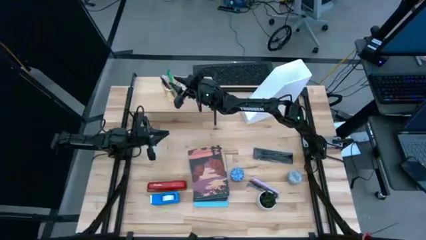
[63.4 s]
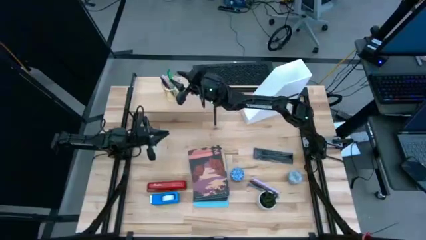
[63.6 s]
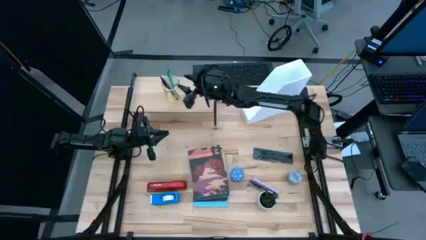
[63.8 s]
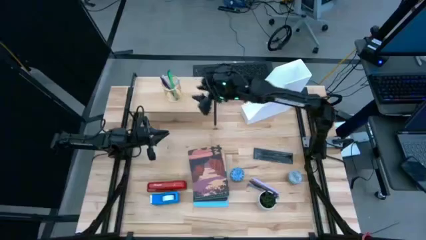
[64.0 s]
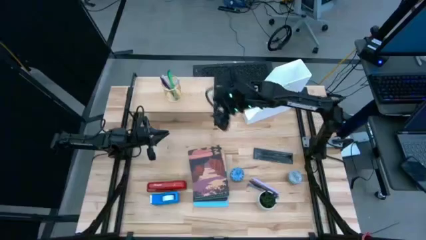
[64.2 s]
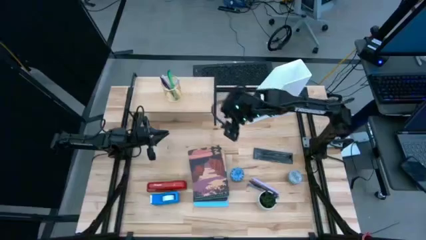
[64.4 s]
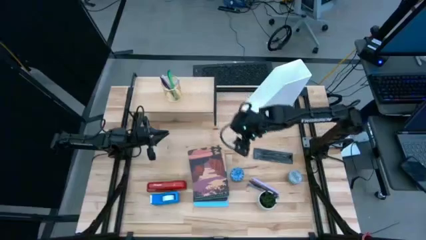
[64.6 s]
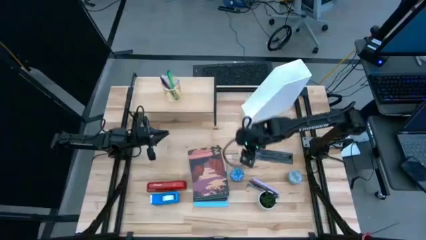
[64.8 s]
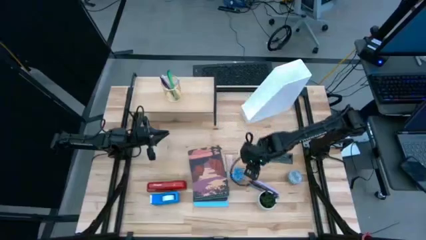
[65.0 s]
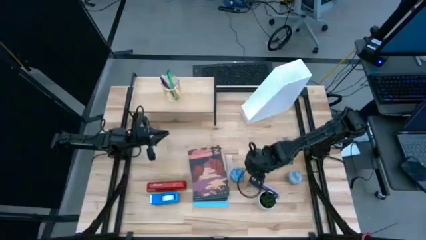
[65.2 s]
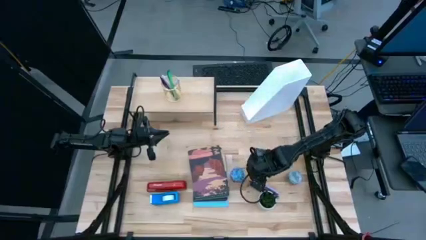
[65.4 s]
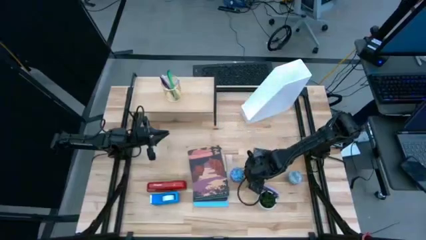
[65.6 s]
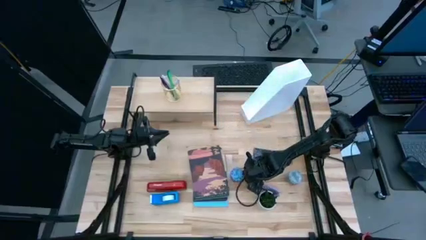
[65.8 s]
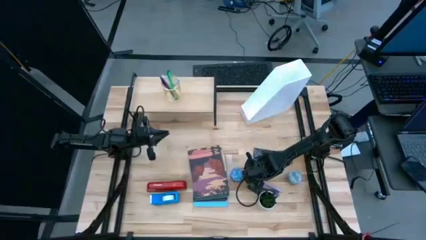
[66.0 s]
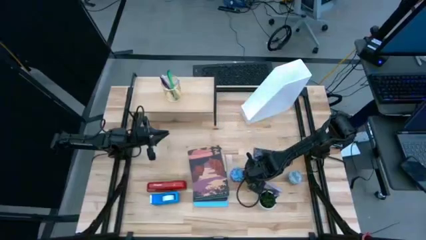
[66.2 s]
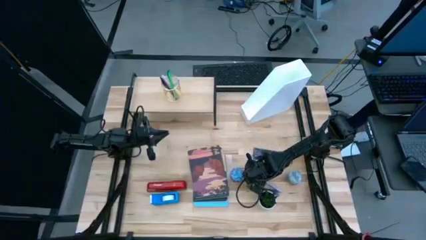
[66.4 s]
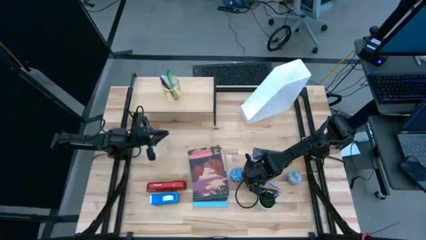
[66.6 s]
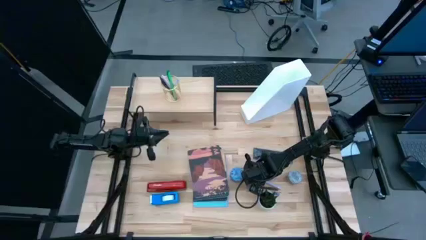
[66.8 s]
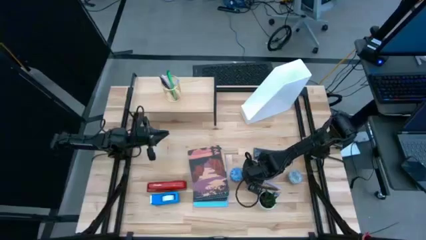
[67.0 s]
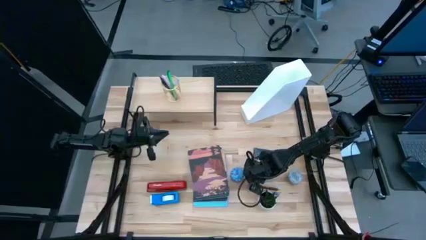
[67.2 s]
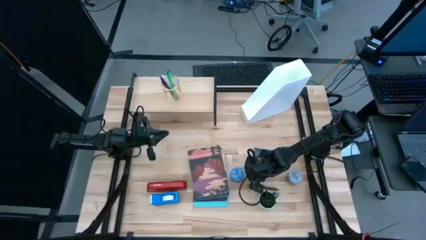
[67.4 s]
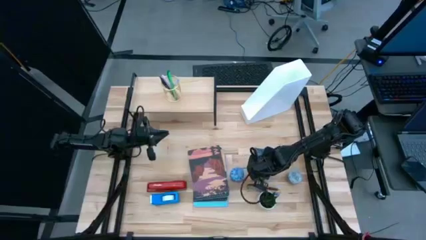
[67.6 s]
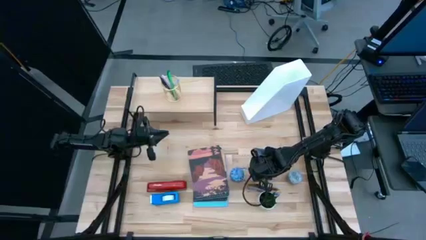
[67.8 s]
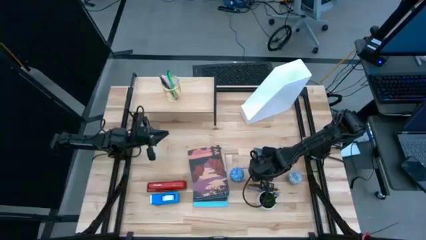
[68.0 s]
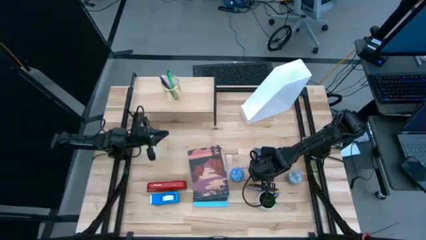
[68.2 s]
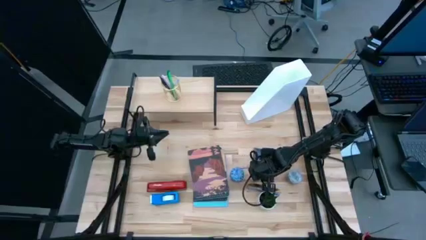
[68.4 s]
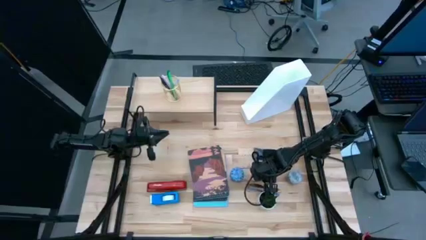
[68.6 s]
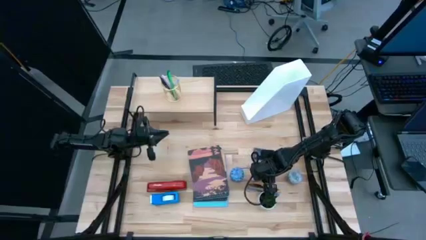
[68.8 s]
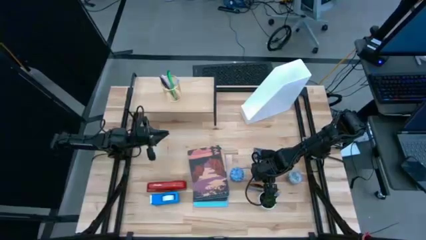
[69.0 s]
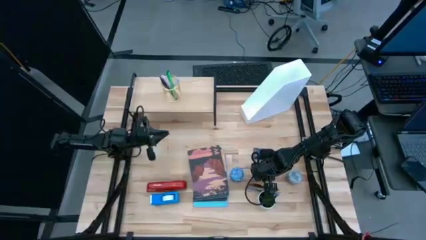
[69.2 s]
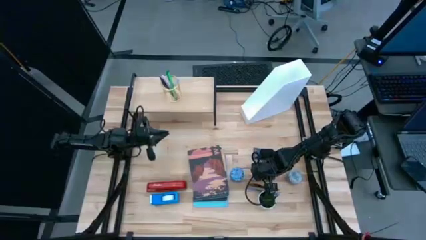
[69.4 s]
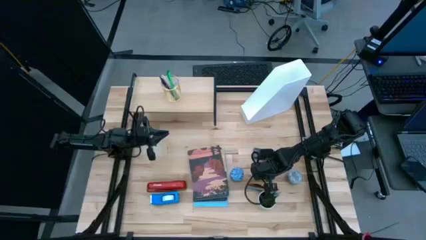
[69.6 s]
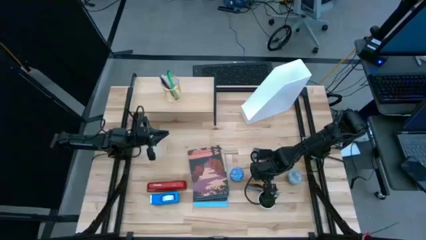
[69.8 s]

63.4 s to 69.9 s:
Task: Stock shelves
Put the purple pen into the gold pen holder on the shelf

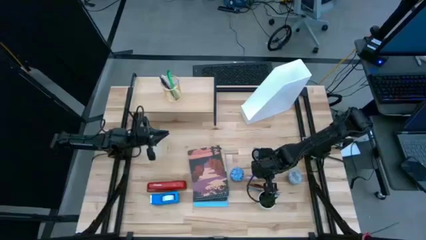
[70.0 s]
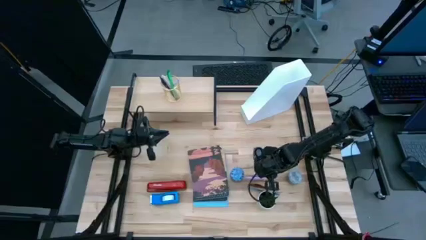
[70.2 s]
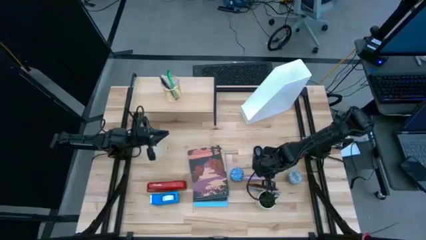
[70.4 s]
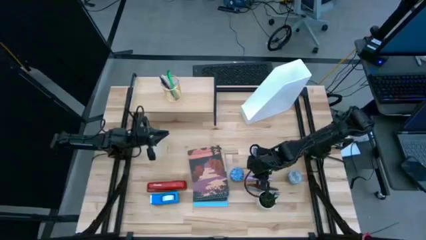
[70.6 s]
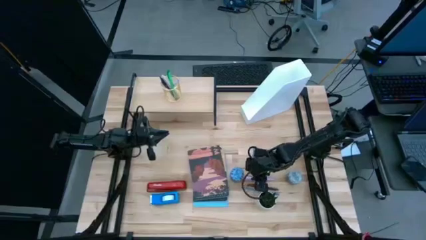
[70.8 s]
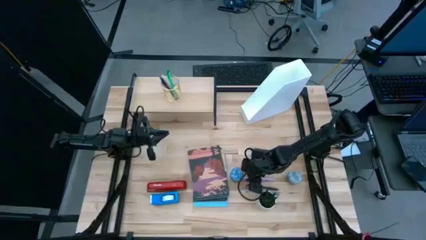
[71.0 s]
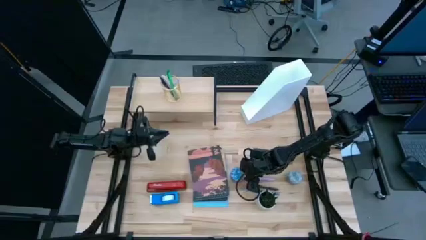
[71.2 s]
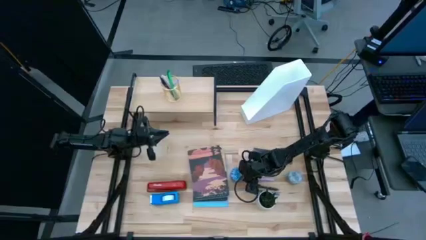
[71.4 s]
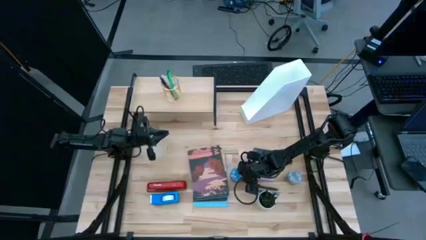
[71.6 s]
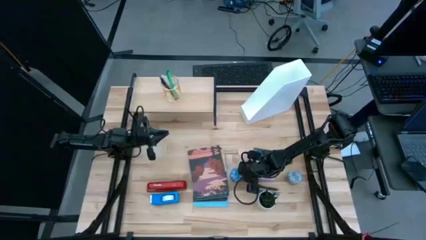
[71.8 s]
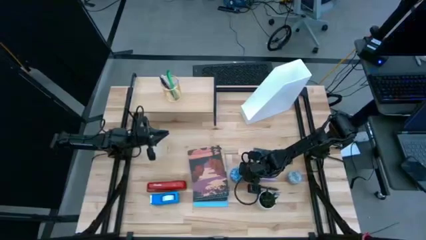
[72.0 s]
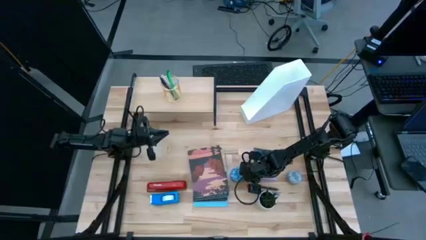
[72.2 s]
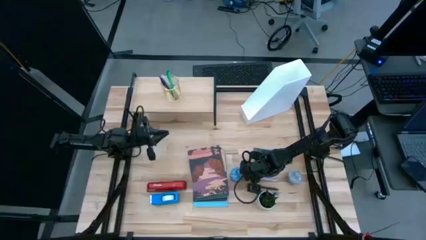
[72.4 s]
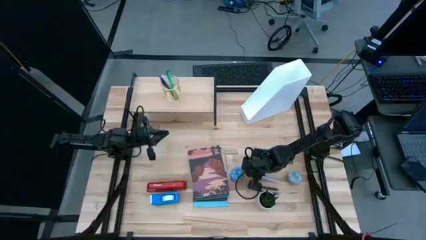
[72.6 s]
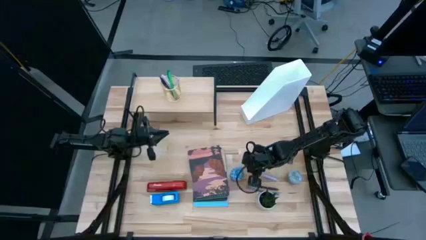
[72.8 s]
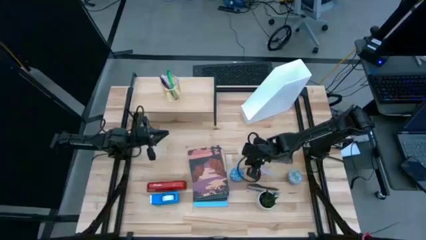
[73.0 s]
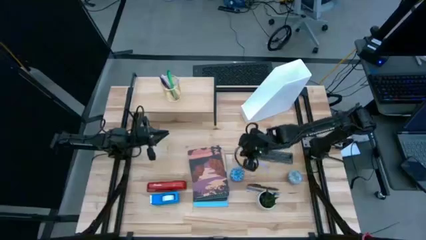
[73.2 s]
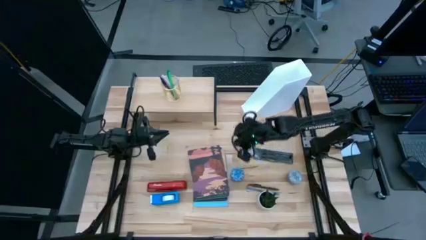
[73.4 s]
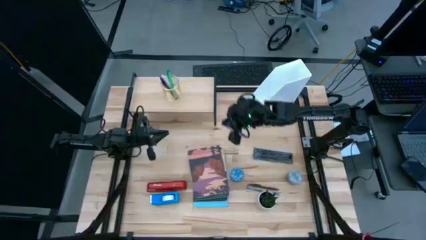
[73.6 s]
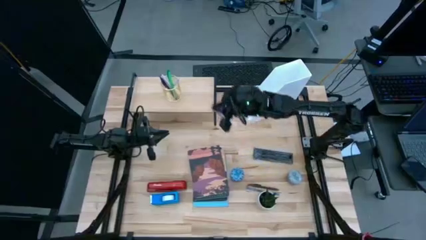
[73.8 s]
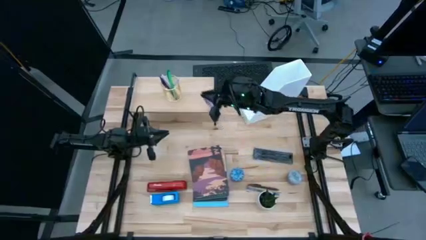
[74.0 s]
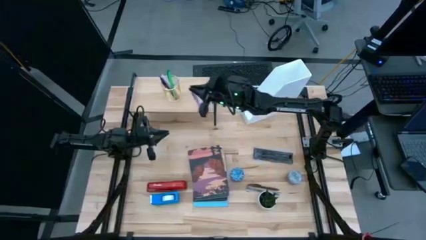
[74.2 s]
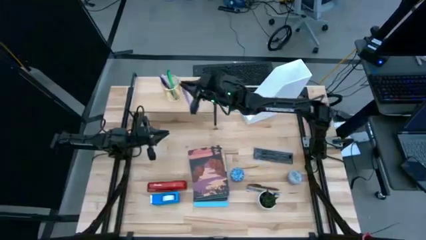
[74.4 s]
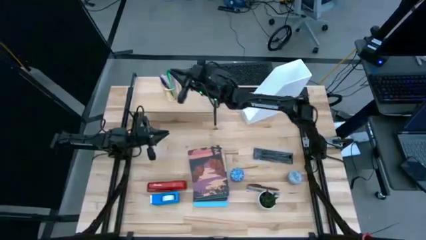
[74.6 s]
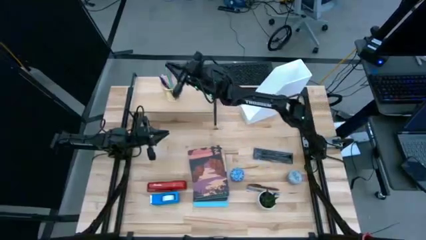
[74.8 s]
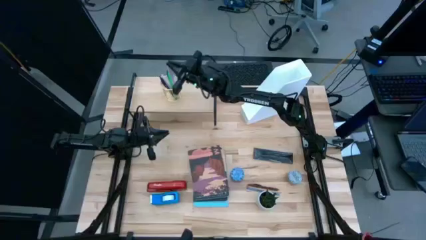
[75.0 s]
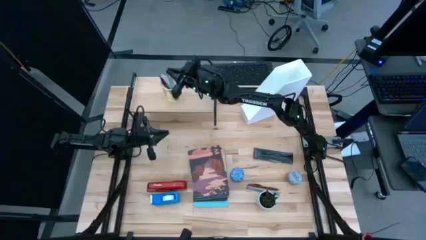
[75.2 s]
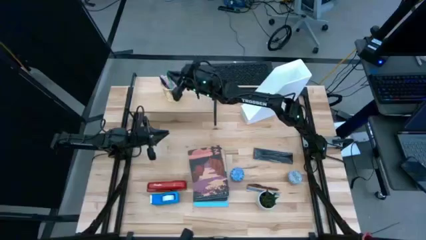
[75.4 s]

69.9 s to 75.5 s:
Put the purple pen into the gold pen holder on the shelf

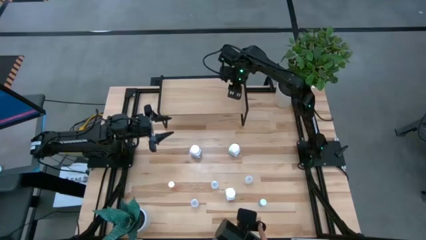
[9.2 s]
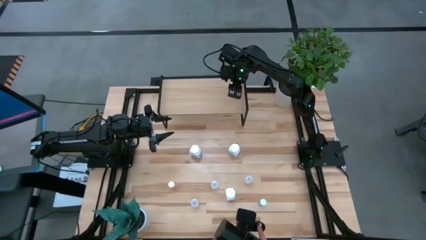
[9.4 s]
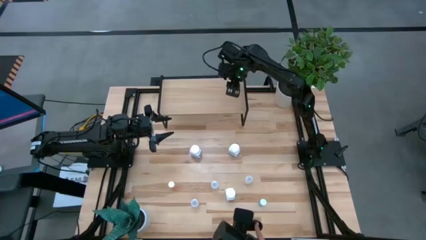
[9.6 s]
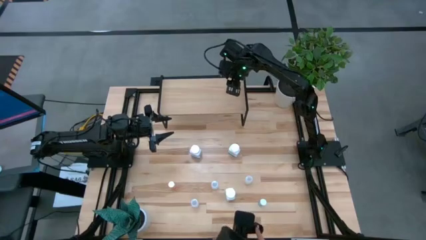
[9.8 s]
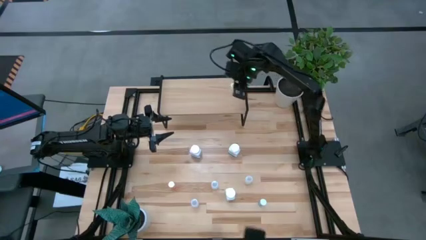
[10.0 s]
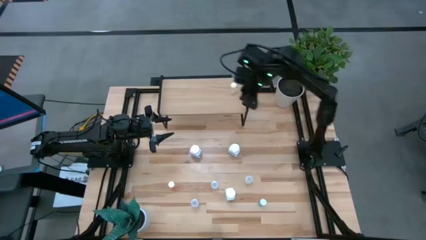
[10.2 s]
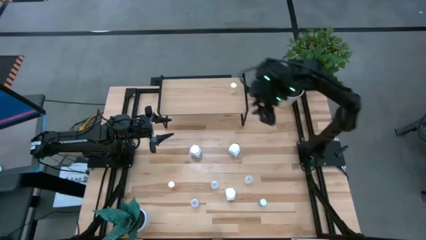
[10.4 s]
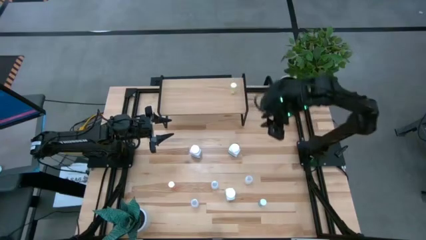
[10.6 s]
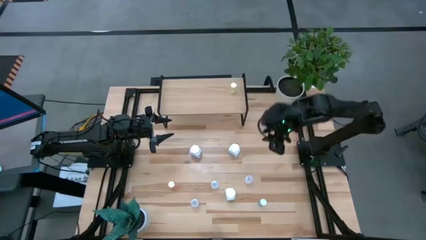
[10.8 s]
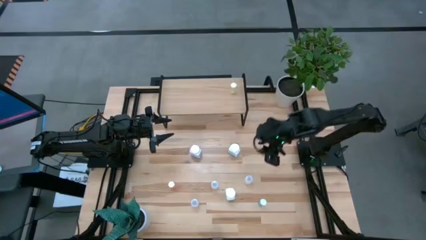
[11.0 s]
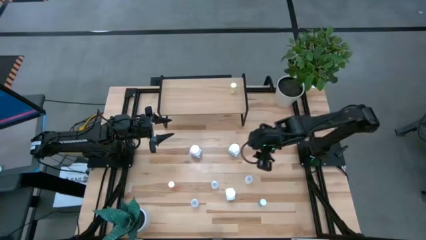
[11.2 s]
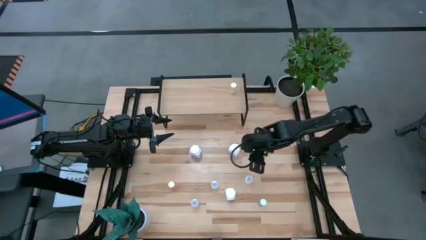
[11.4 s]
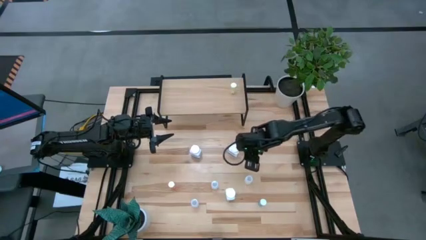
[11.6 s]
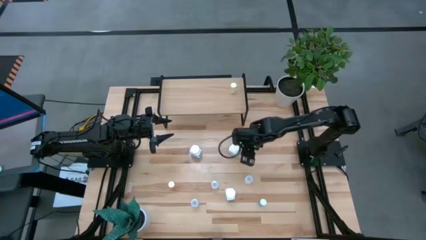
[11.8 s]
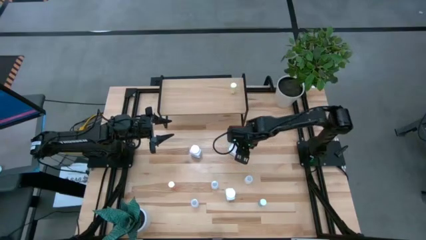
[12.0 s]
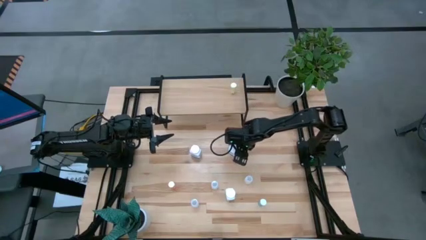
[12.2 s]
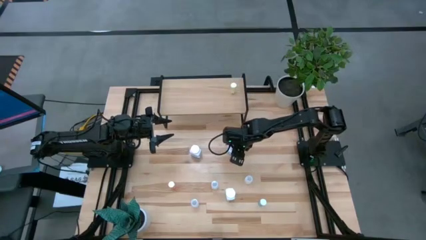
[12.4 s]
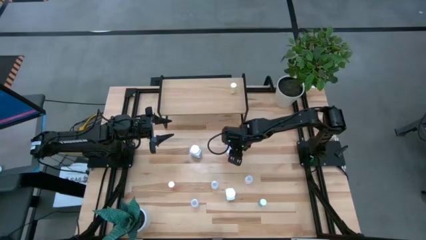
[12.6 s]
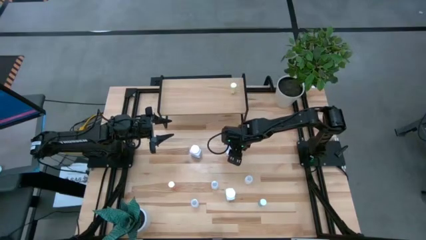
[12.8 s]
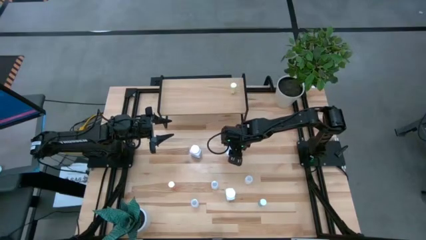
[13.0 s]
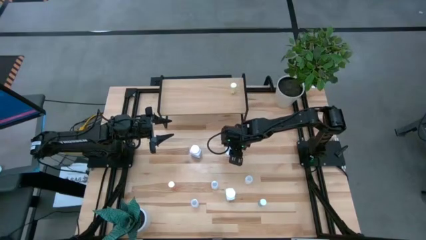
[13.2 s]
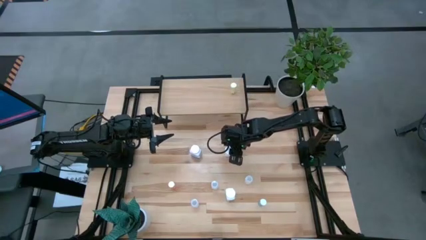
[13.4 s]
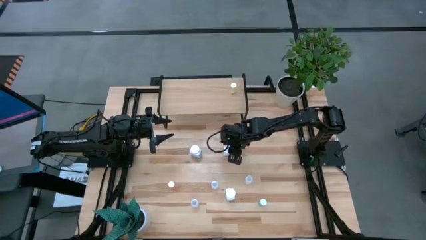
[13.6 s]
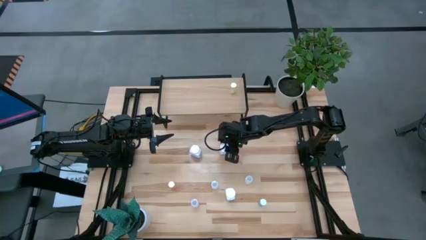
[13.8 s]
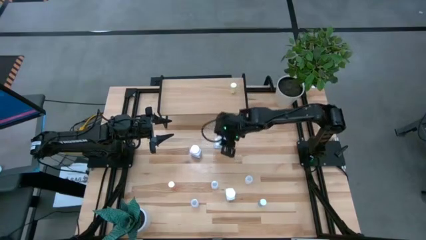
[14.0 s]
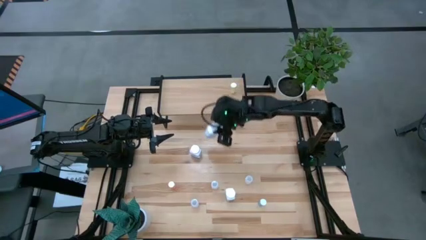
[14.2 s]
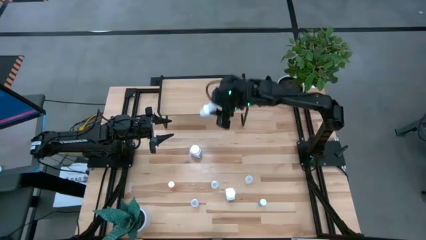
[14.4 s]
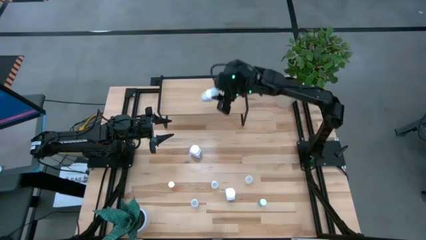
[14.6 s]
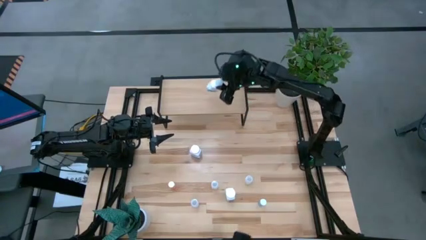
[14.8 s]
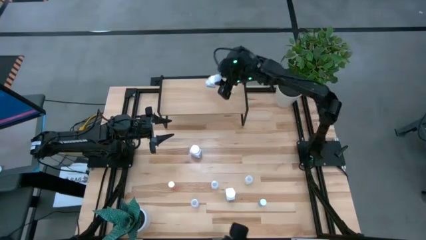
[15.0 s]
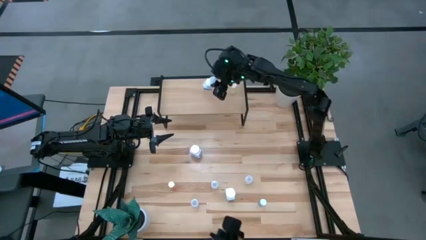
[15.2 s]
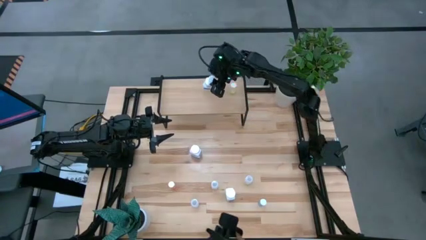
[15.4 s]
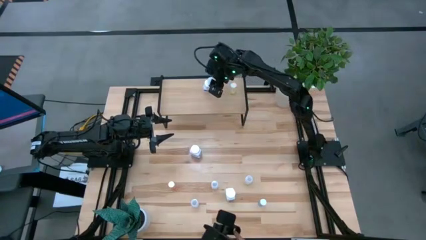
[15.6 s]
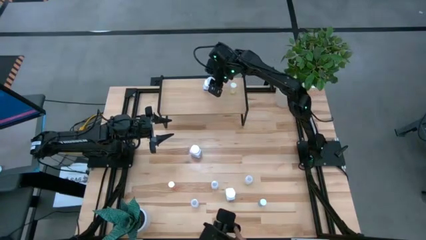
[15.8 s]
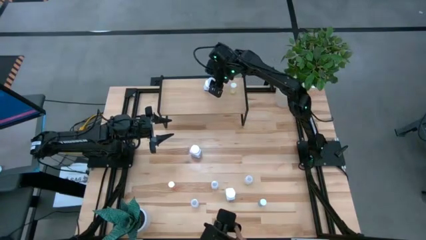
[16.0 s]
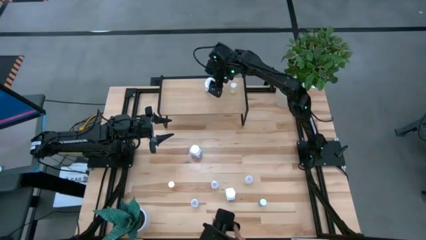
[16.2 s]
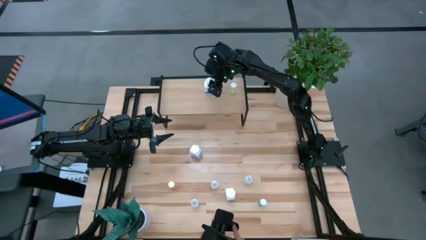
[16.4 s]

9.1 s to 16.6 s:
Task: Pick and place medicine bottles onto shelf by color
Put the top right white blue pill bottle on the shelf
